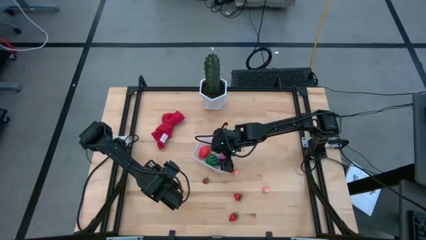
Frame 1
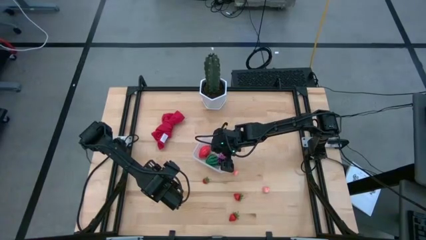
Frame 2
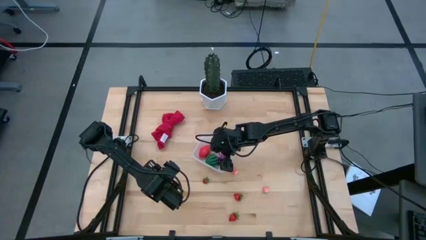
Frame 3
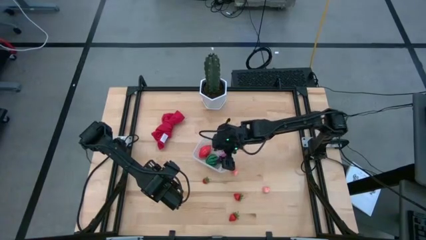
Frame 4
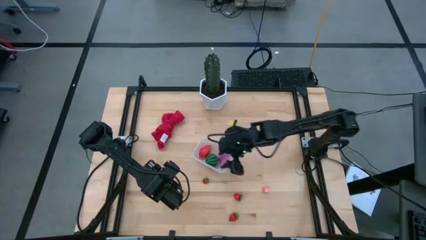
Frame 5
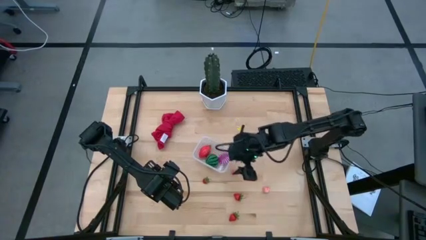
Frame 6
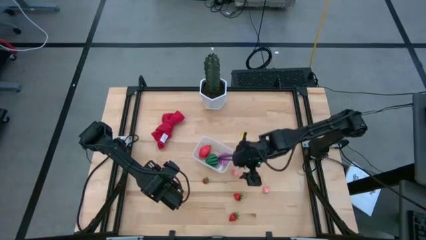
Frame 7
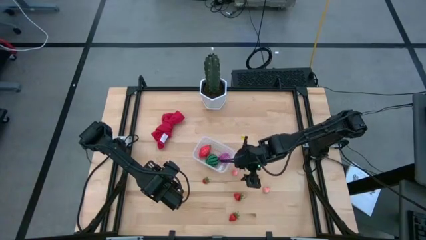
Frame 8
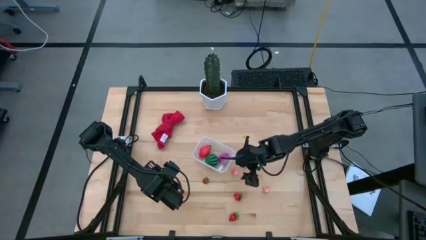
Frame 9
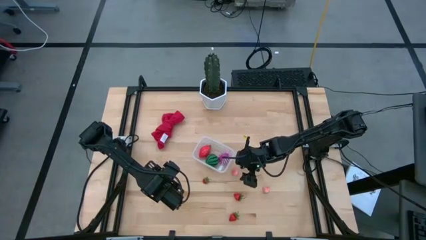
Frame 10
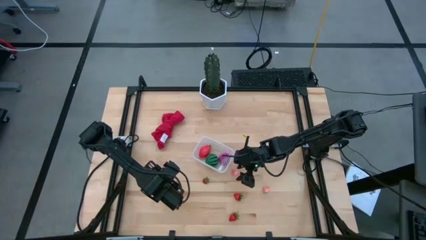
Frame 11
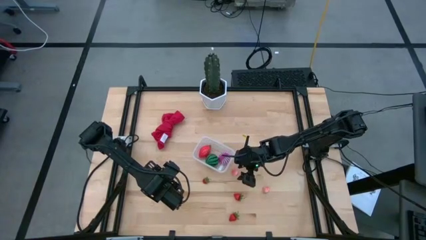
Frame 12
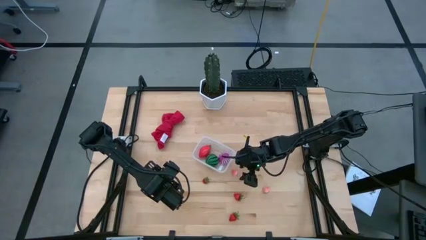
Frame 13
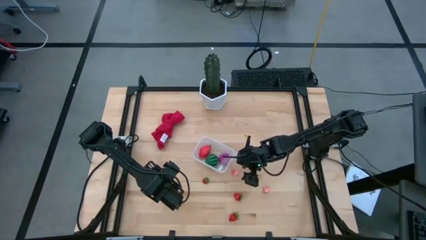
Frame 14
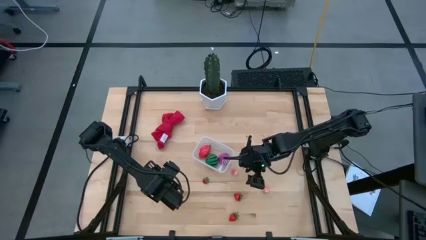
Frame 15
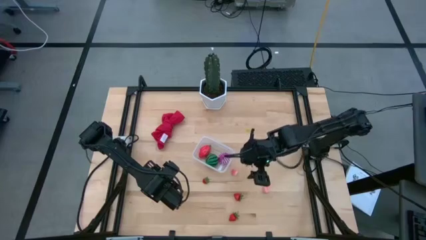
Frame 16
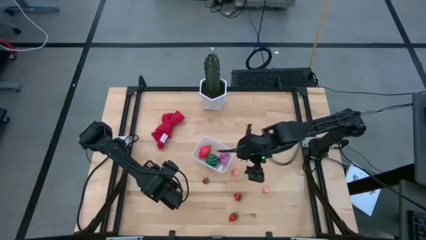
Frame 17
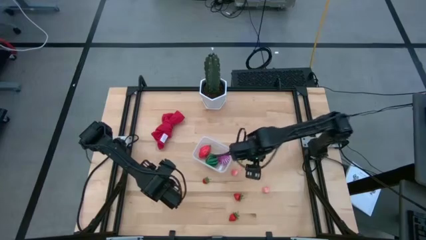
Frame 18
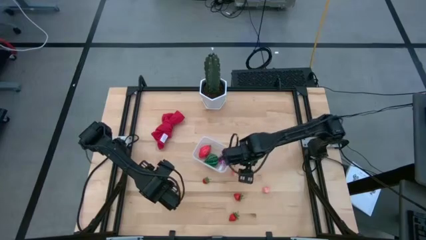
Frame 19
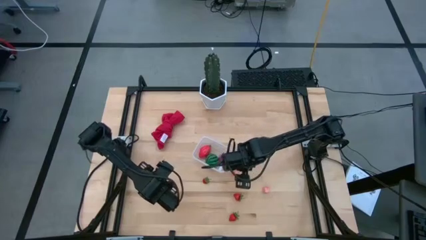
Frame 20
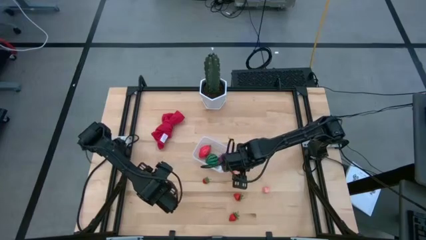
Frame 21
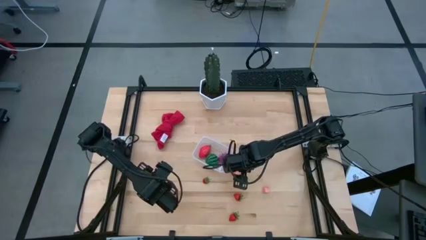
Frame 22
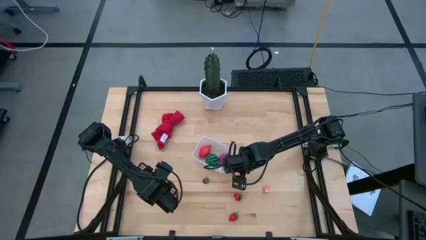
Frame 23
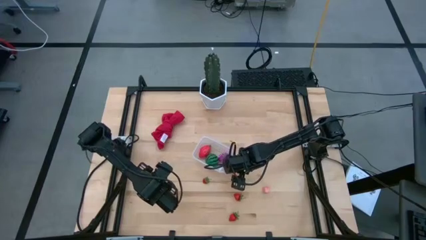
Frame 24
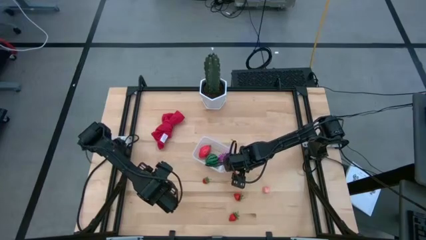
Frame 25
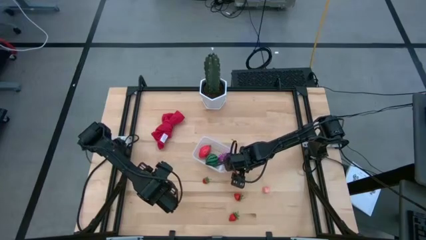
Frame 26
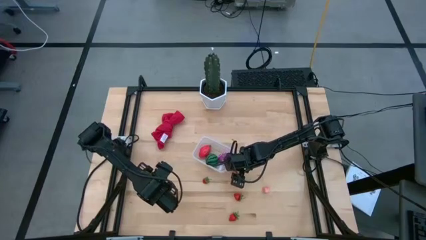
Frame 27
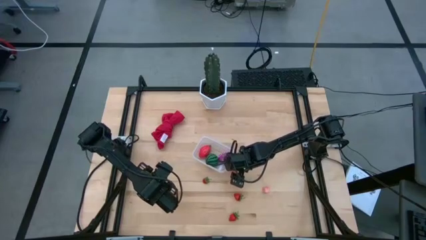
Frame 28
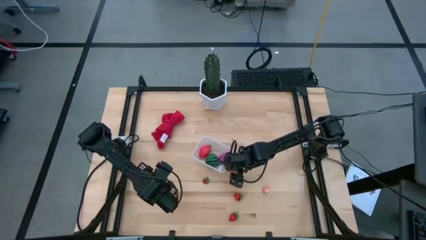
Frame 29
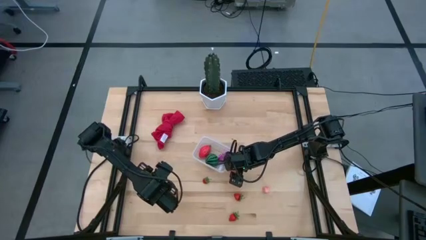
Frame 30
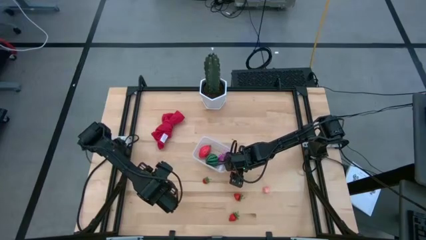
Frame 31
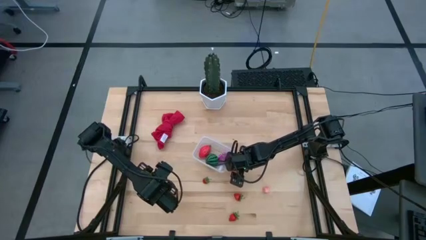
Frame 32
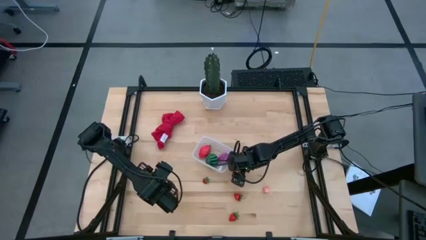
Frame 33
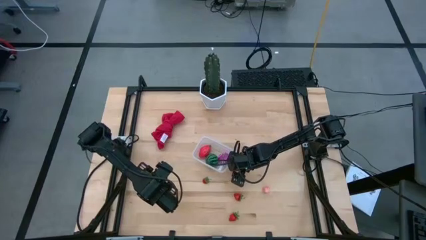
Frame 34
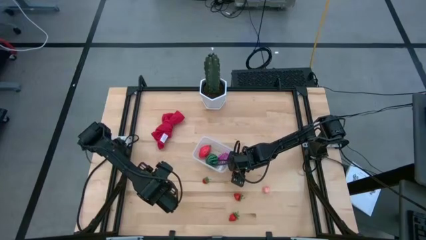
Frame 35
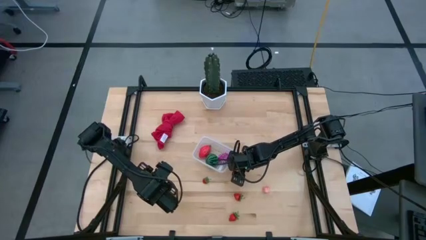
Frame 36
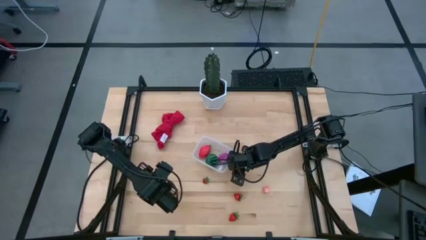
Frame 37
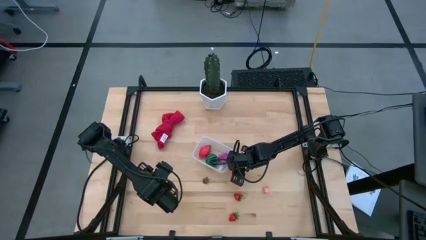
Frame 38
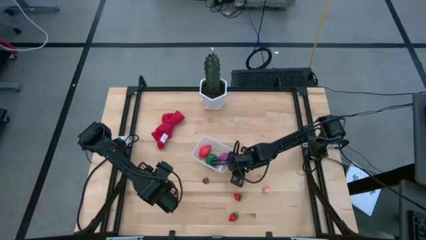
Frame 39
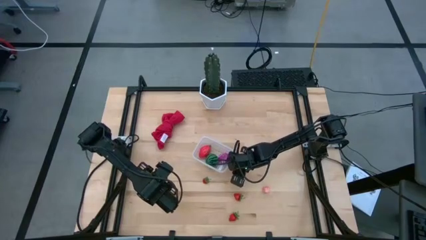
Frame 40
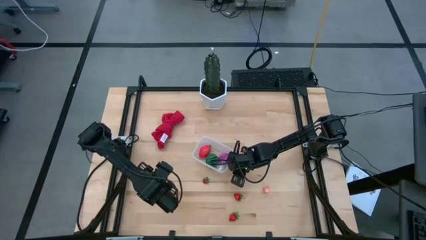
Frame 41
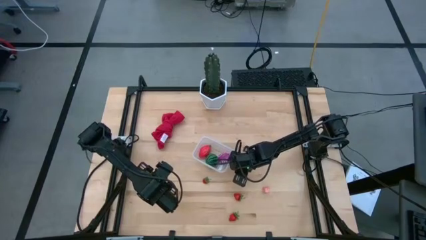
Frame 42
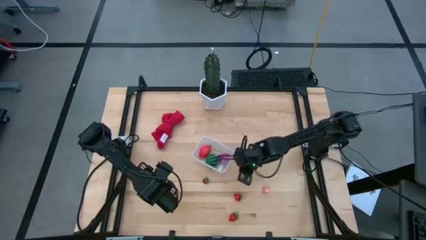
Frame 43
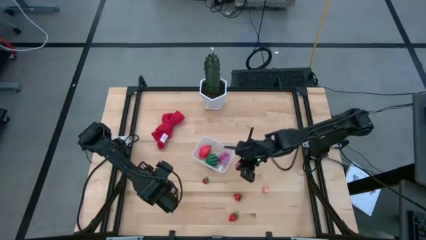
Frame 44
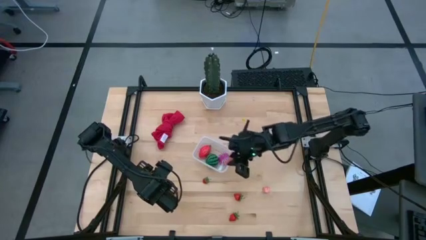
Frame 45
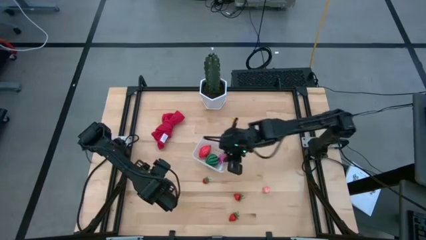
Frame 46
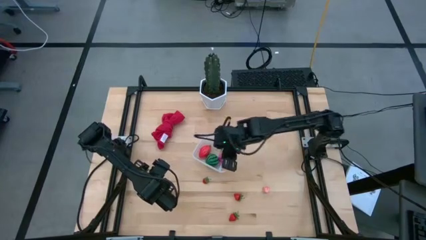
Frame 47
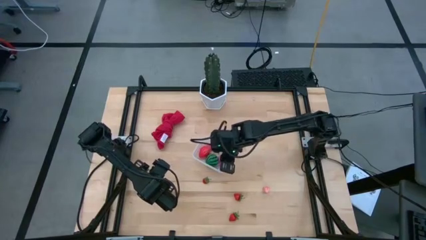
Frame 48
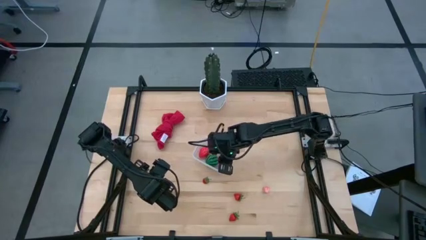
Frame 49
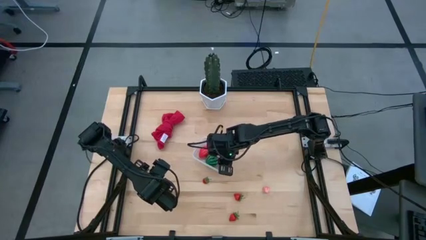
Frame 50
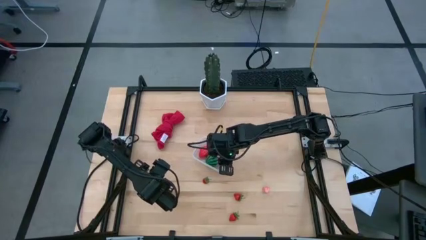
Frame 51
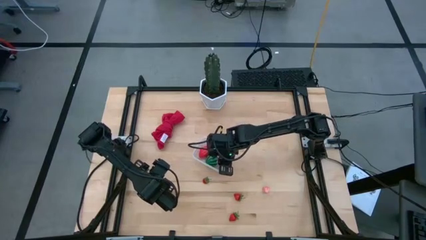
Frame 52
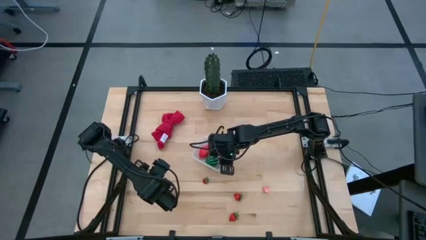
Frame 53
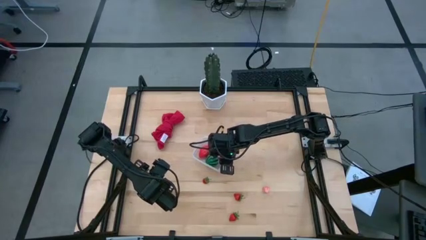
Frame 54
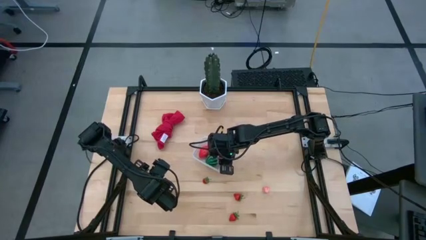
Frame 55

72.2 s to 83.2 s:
Task: Pick and placing Produce into tupperware
Put the left pink peach into the transparent container

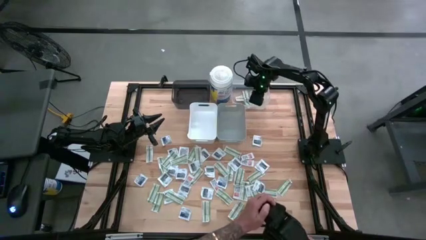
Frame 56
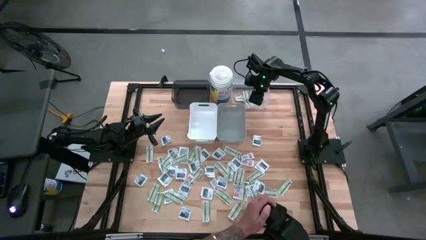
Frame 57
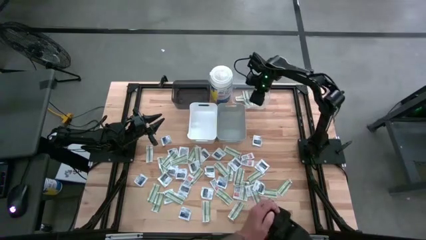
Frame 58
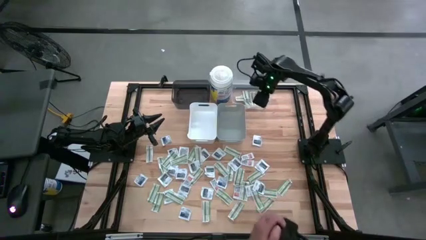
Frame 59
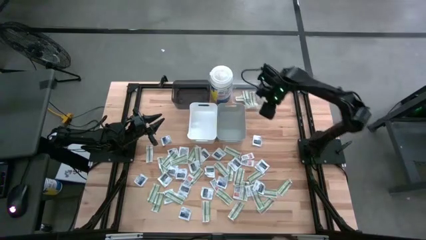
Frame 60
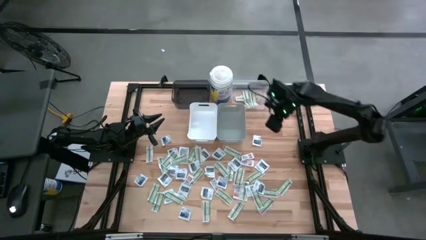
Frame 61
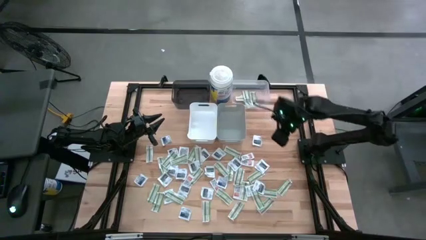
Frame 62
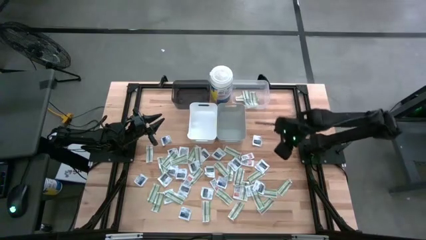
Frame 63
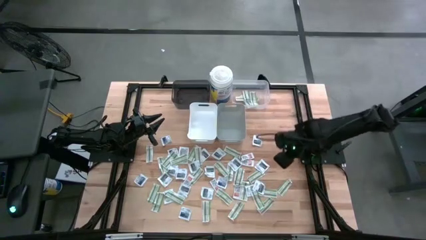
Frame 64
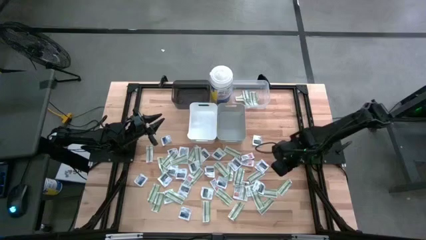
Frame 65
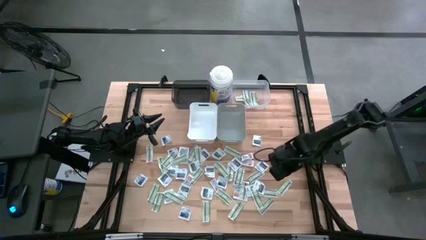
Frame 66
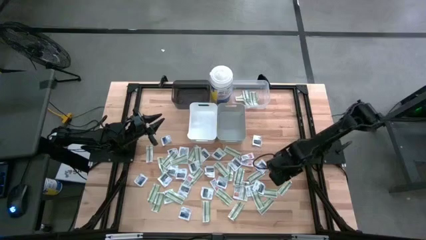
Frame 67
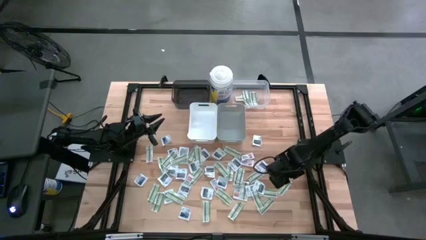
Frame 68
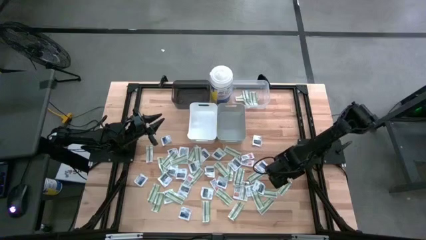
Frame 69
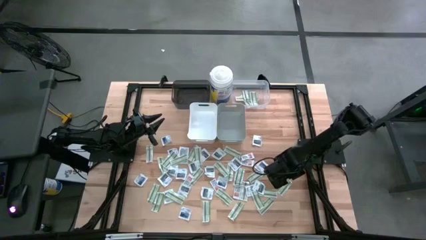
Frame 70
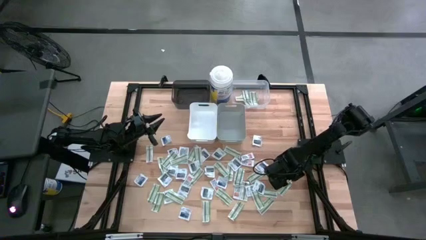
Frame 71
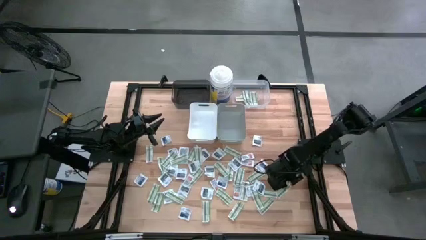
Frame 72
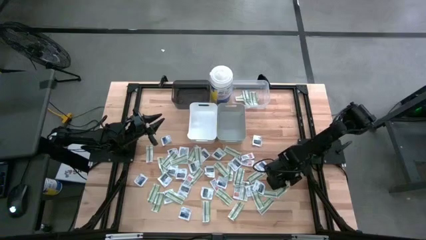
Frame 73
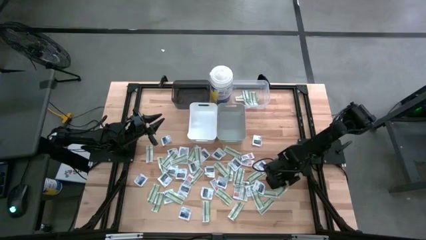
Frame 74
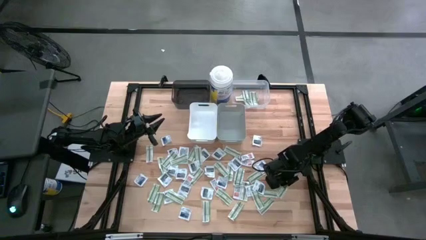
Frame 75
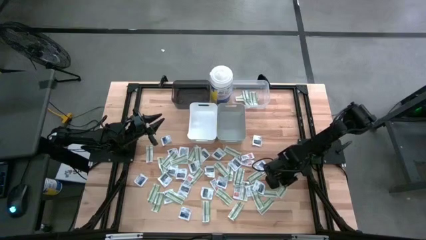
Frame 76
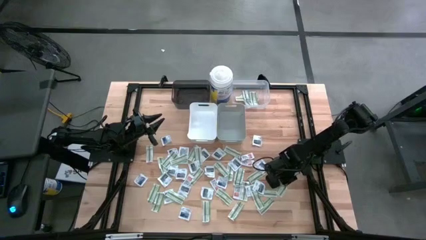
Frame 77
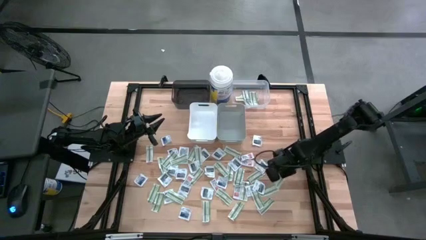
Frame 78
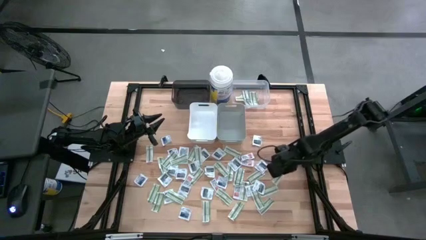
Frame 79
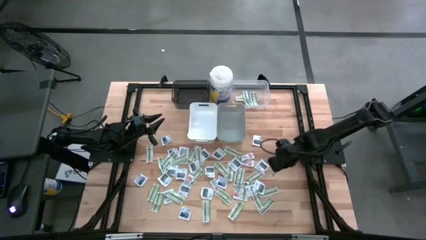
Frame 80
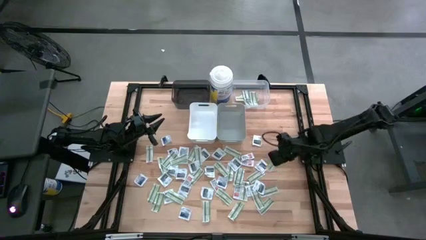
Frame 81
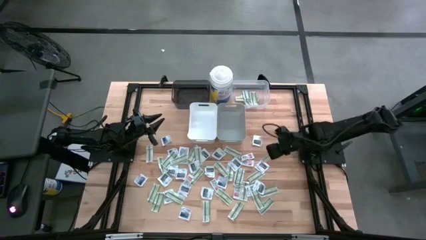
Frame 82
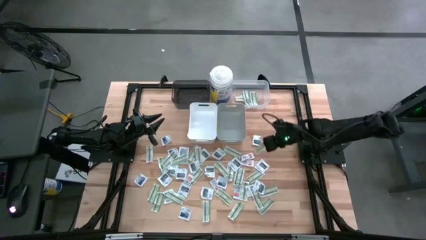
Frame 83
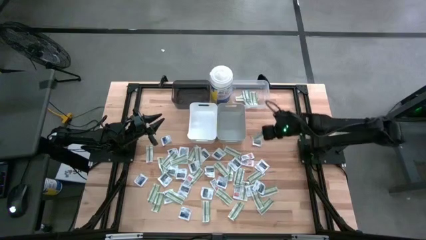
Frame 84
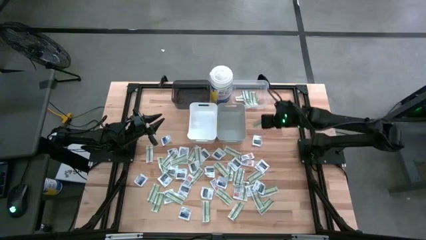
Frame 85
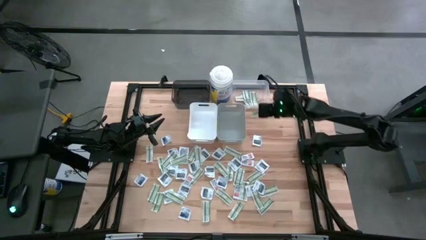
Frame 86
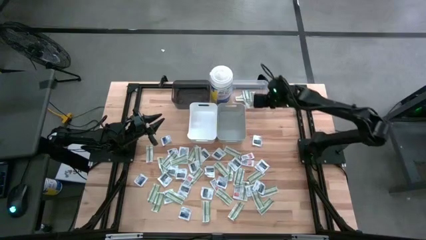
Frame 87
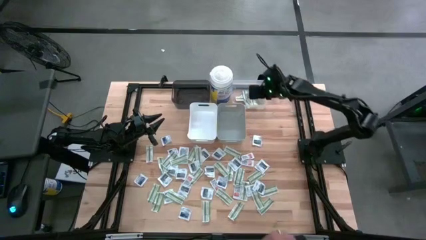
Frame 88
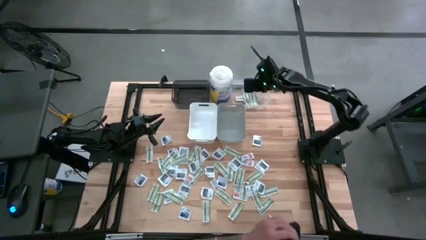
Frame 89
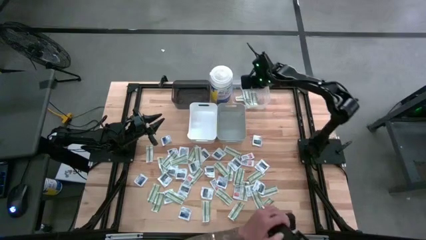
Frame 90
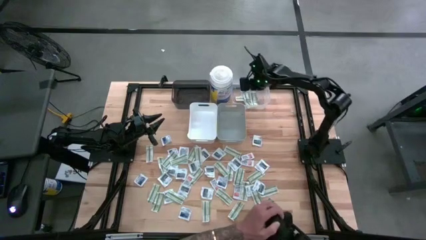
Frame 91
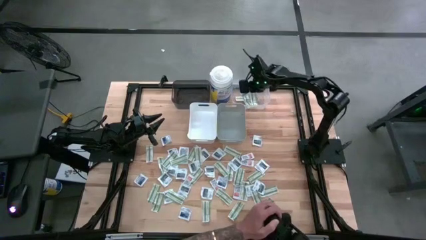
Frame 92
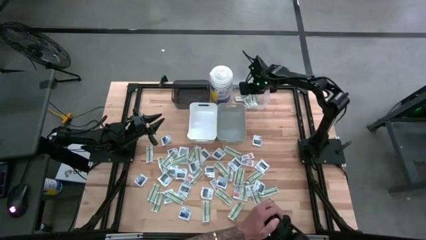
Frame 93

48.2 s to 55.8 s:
Task: Pick & Place First Aid Supplies
Put the band aid into the transparent bin
